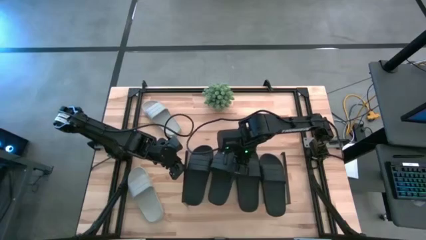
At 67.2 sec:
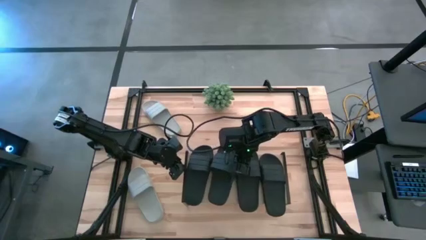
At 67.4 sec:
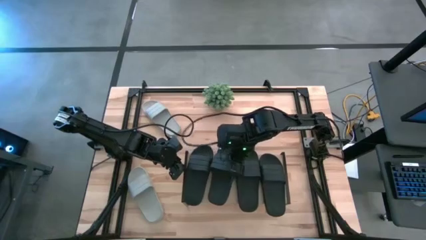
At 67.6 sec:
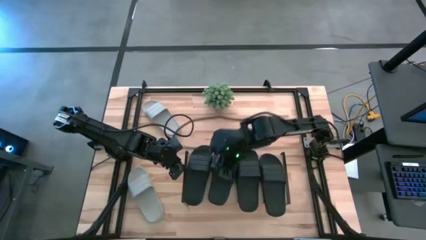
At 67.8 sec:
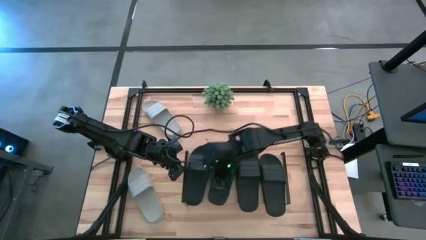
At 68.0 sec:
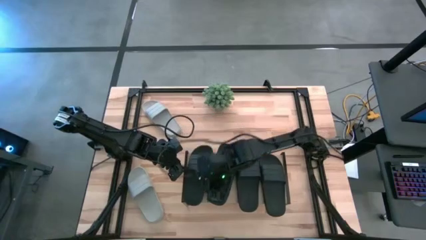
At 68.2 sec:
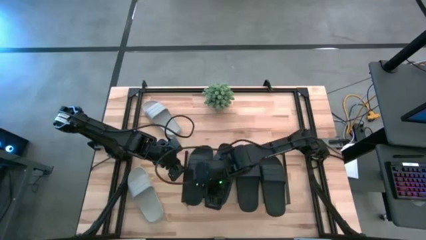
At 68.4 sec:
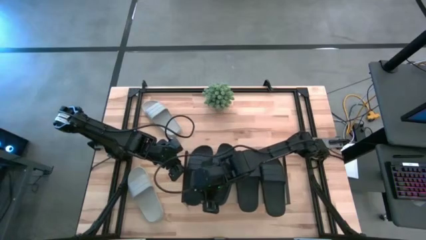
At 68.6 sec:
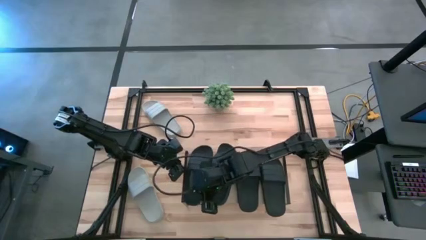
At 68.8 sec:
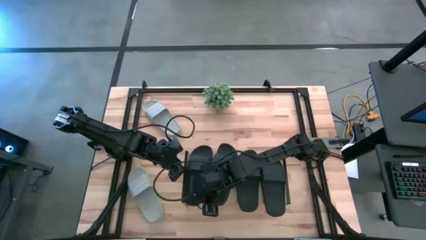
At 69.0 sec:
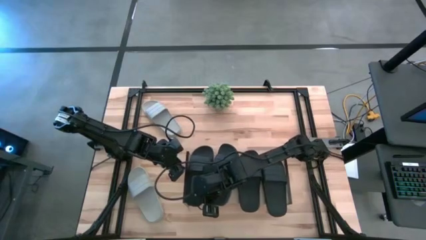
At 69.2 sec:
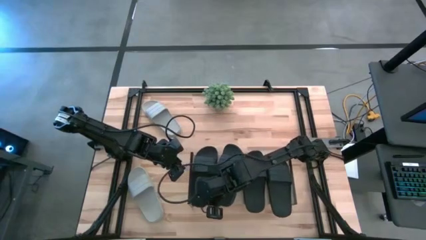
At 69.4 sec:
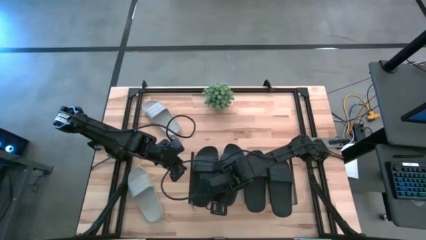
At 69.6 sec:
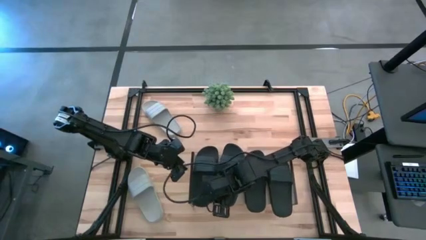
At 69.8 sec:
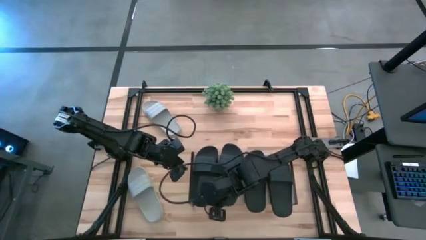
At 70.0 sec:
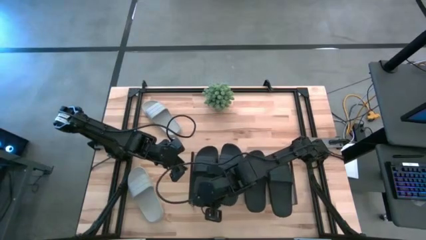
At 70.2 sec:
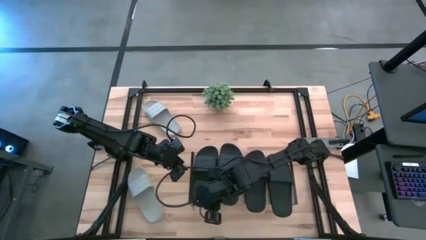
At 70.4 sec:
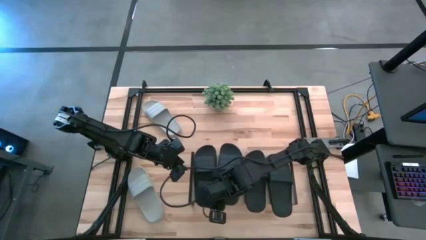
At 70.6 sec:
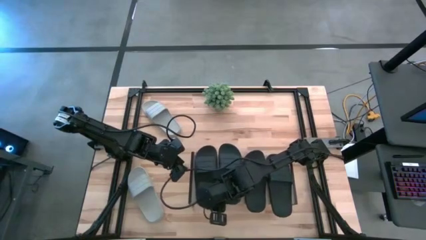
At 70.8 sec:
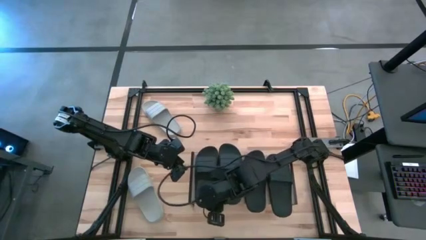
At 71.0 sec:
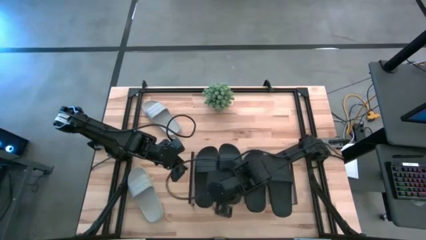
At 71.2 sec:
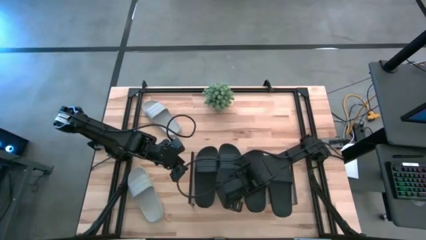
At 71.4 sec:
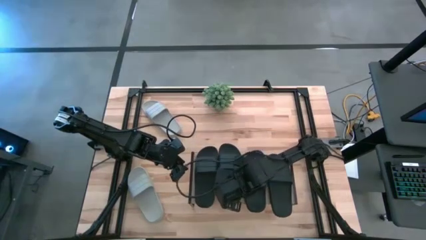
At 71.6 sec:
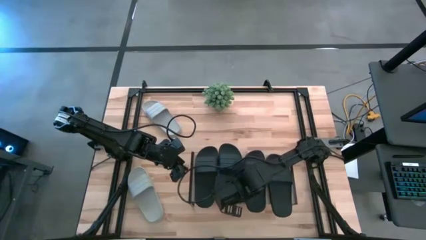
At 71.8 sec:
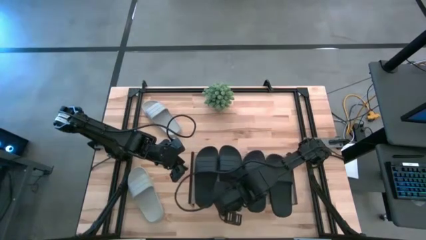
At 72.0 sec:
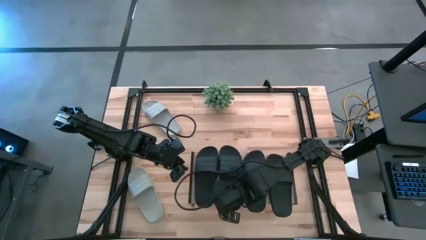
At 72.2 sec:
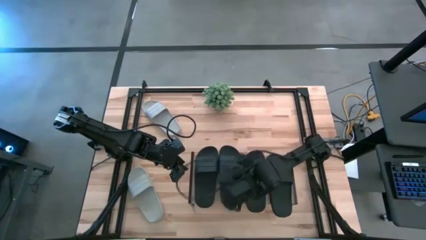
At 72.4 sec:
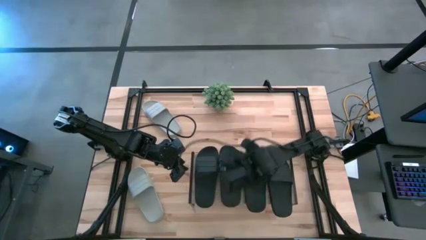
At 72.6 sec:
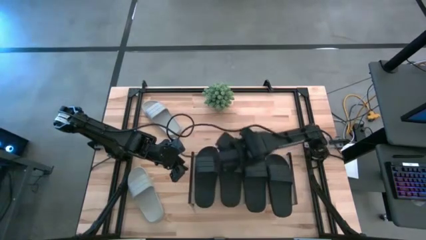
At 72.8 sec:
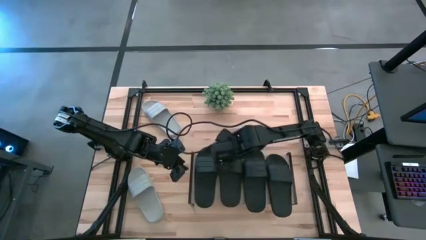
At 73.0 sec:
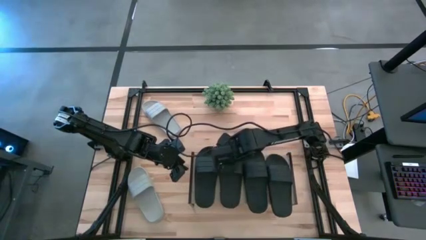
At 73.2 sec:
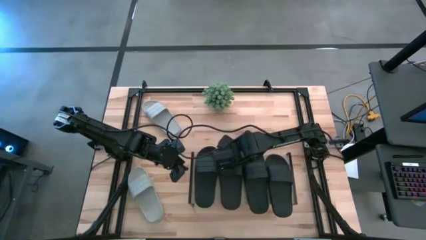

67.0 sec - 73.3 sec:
Task: Pick and place slides into the shelf
Adjust the black slippers on the shelf

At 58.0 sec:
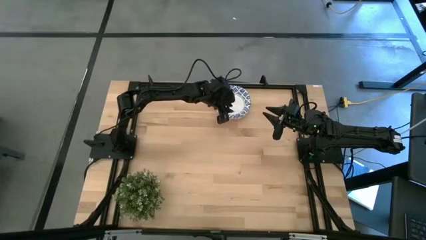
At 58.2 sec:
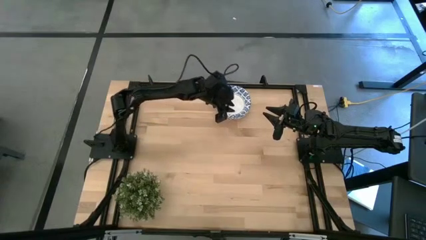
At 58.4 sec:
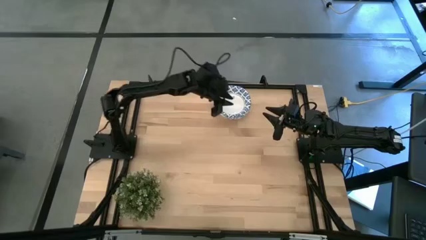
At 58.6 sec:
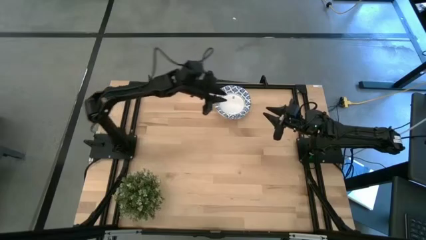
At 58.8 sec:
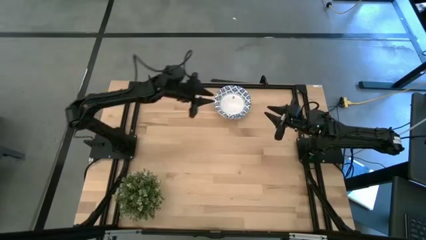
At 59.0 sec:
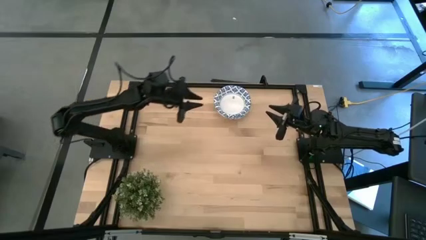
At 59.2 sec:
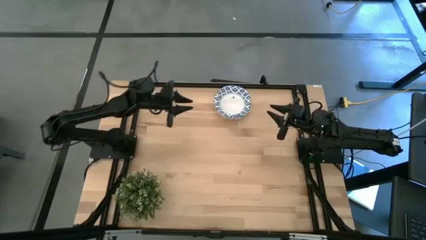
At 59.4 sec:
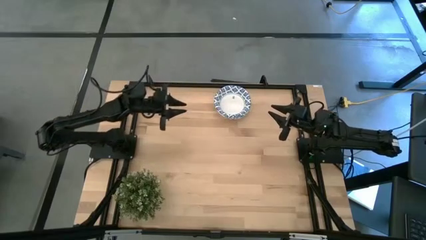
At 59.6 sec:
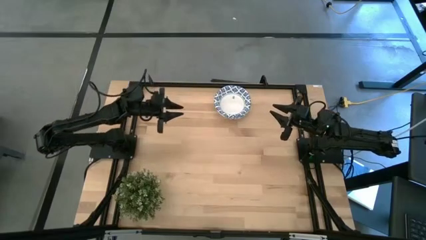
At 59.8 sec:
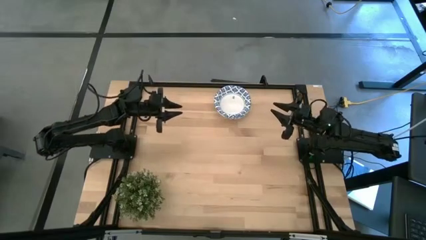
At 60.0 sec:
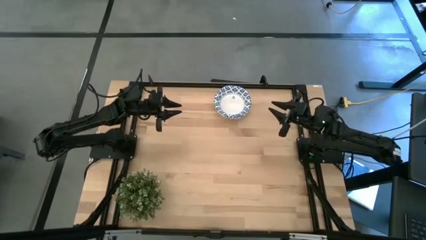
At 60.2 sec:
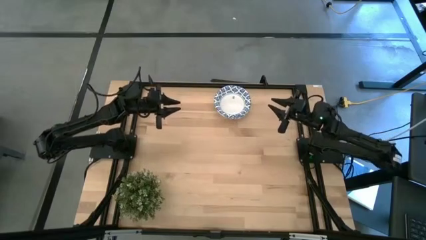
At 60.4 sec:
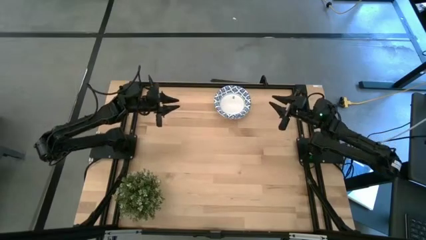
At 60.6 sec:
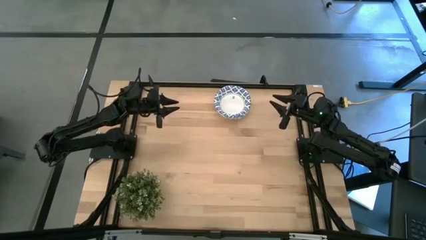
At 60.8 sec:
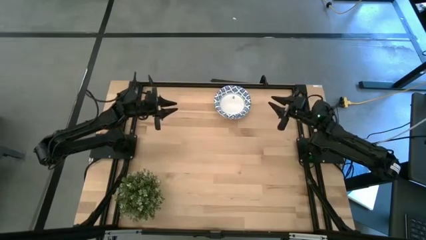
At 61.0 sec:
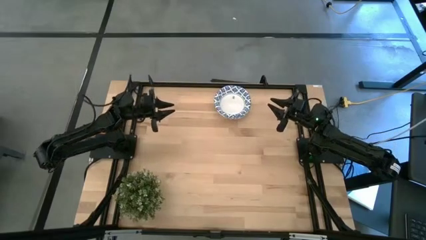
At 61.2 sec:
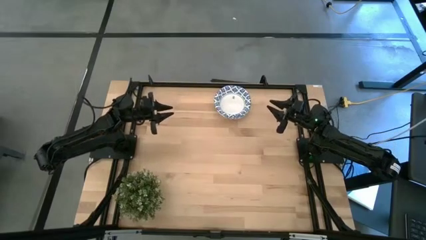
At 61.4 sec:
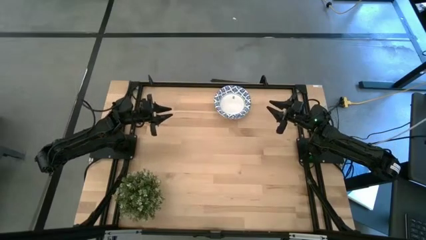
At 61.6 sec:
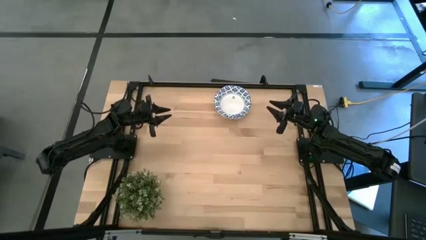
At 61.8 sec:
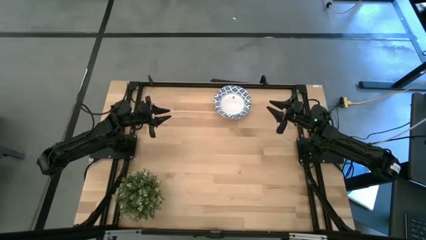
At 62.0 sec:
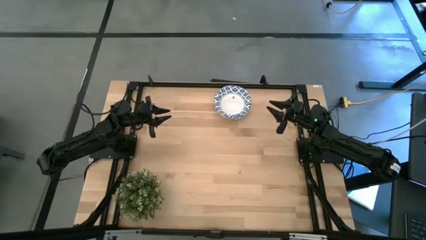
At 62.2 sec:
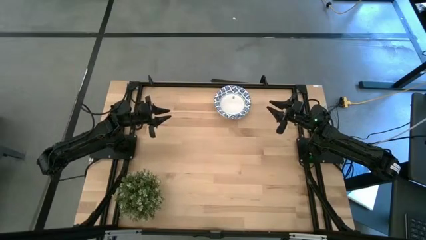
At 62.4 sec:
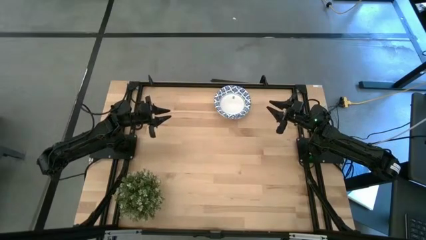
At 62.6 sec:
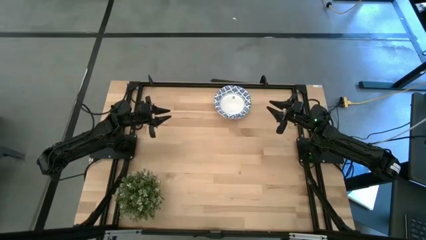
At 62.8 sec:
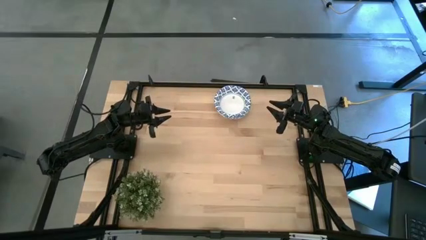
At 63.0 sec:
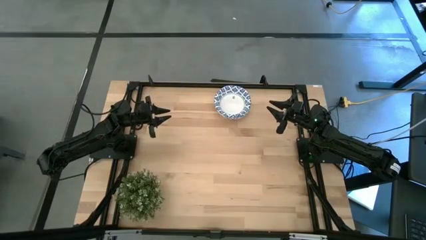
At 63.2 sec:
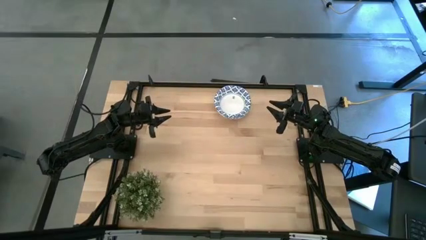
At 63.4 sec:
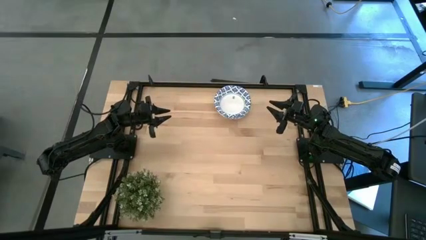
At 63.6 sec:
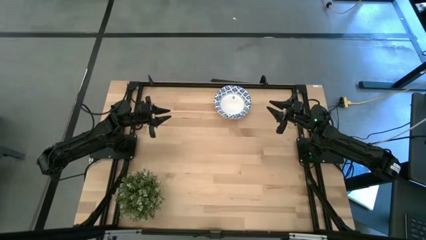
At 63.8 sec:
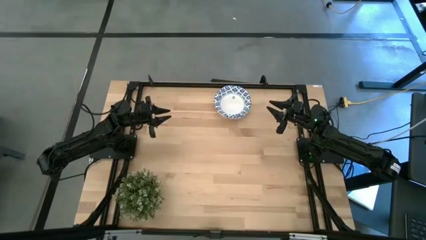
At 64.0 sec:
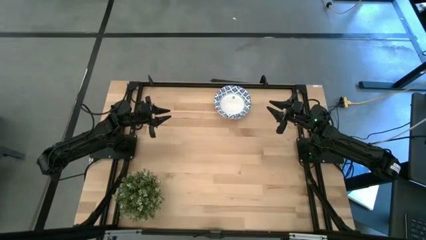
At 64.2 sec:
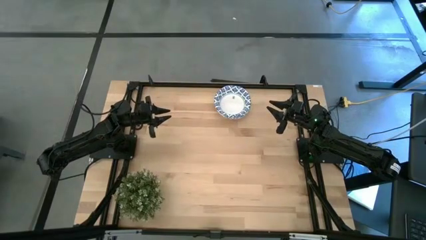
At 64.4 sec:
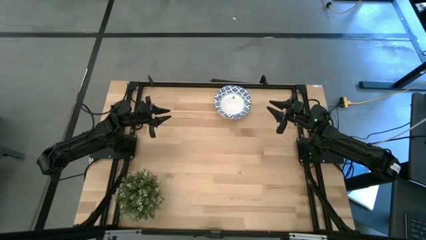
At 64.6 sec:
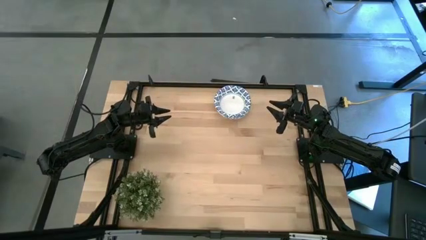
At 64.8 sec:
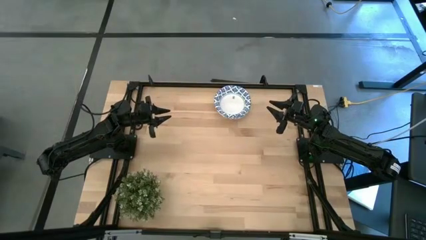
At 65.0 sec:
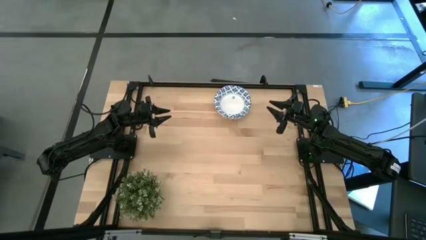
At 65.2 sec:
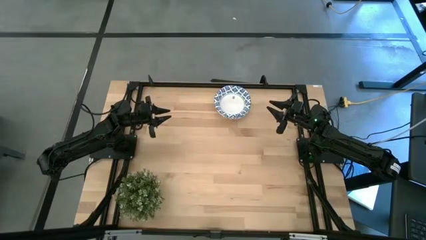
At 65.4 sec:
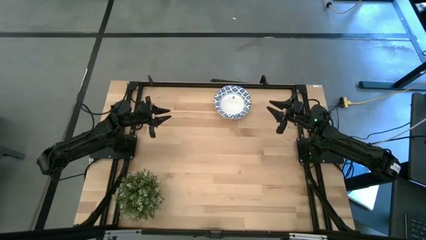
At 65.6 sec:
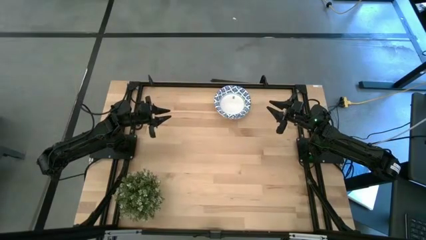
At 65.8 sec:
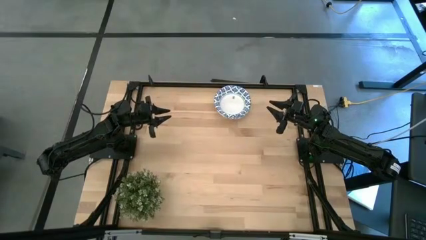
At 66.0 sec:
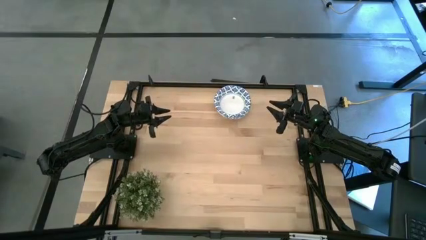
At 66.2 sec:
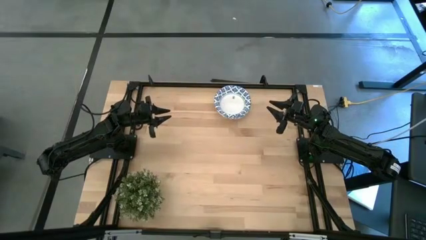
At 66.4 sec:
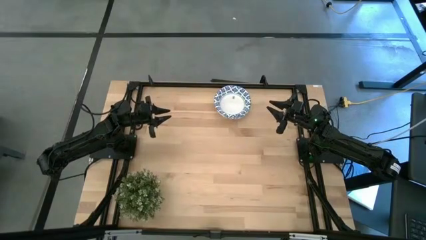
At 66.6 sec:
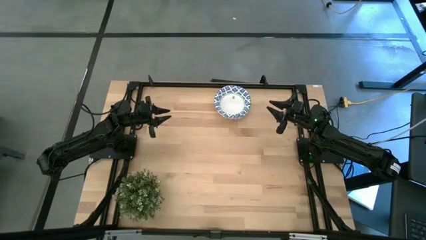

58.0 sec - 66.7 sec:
Task: Nest bowls inside each other
Return to Home Position
